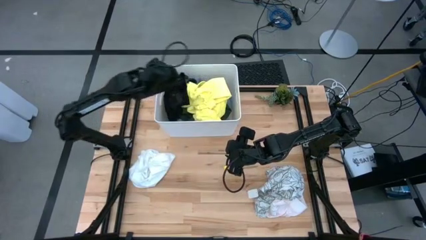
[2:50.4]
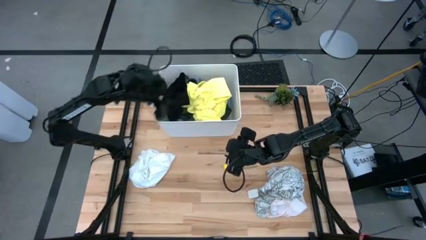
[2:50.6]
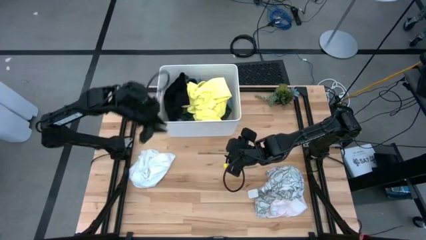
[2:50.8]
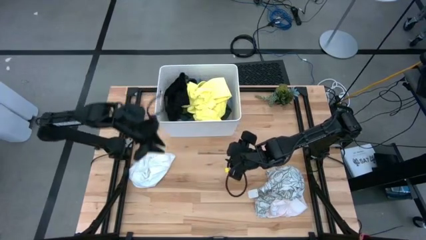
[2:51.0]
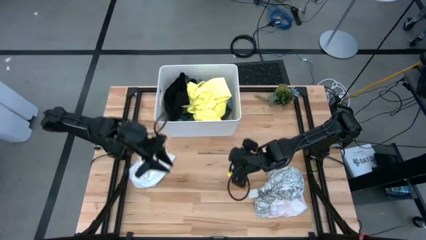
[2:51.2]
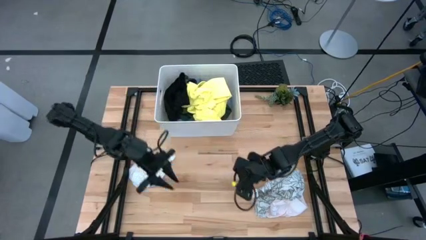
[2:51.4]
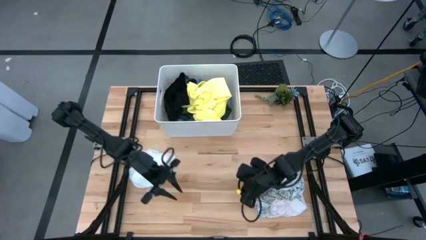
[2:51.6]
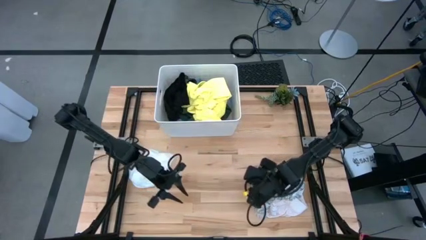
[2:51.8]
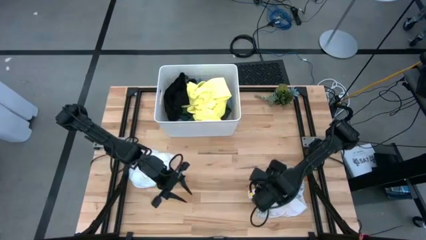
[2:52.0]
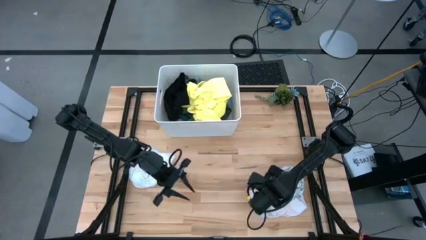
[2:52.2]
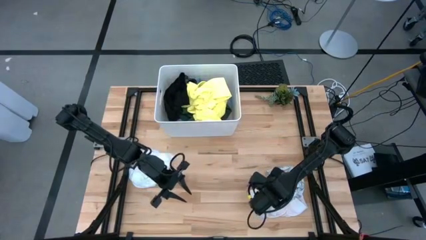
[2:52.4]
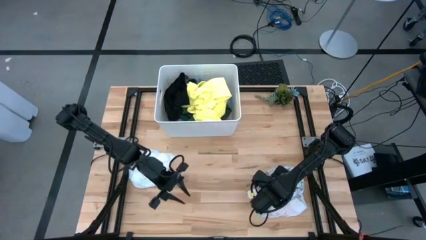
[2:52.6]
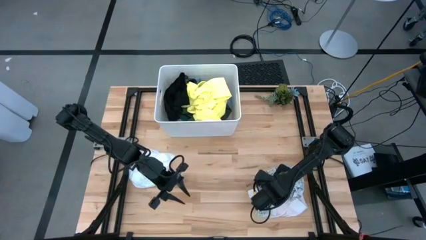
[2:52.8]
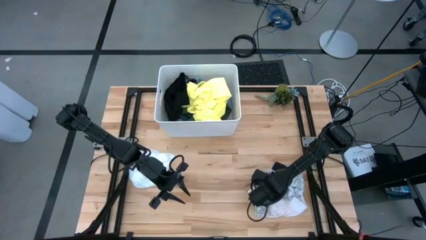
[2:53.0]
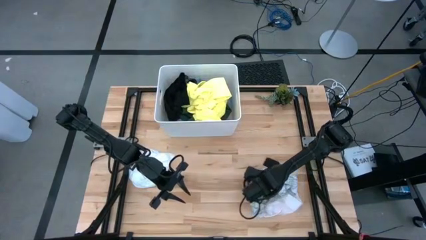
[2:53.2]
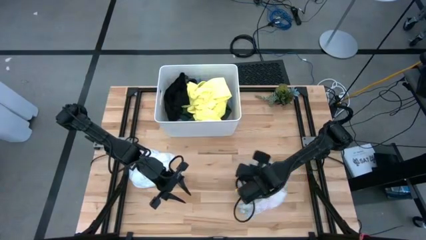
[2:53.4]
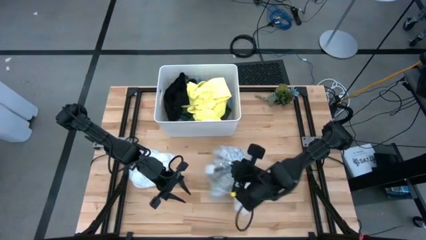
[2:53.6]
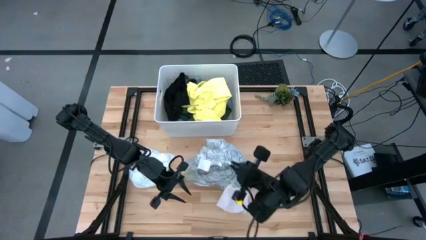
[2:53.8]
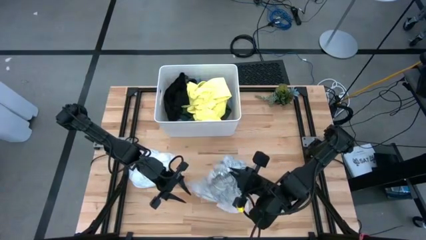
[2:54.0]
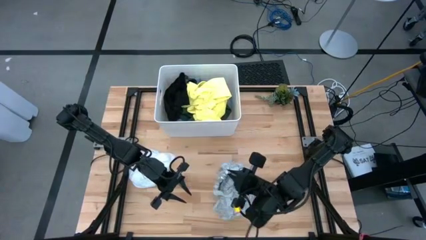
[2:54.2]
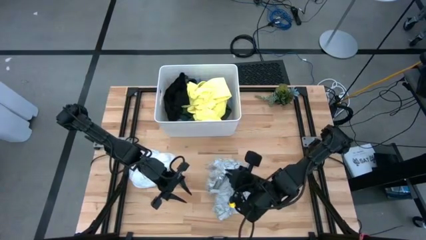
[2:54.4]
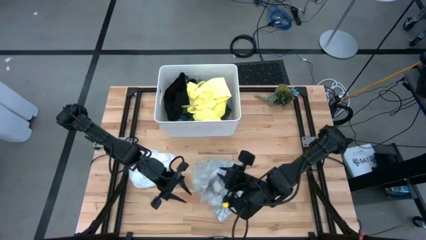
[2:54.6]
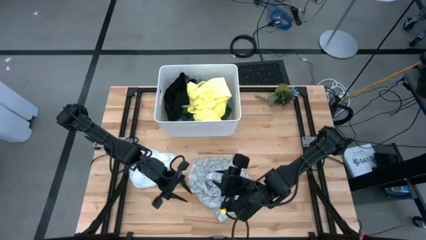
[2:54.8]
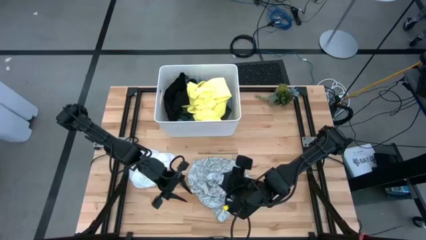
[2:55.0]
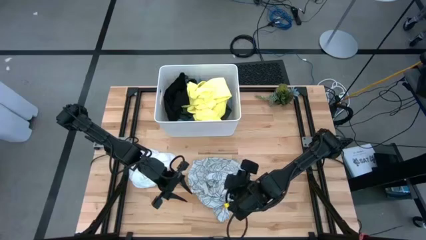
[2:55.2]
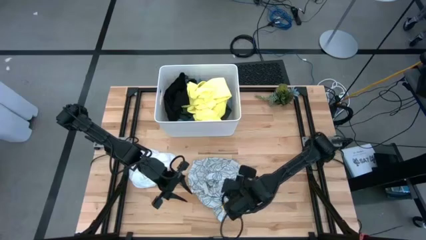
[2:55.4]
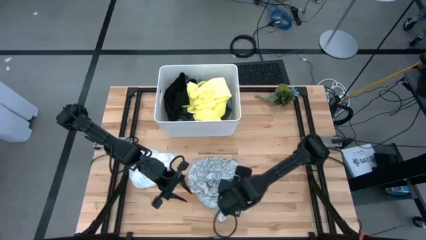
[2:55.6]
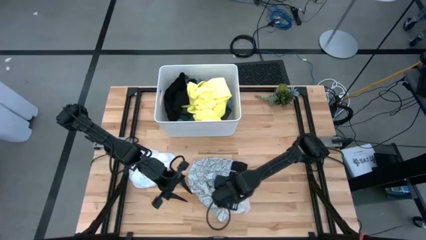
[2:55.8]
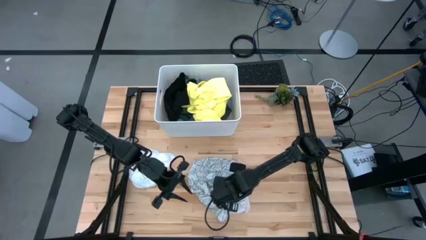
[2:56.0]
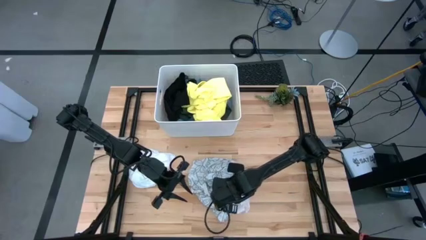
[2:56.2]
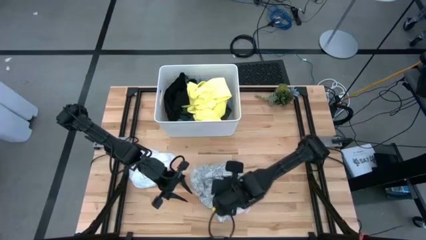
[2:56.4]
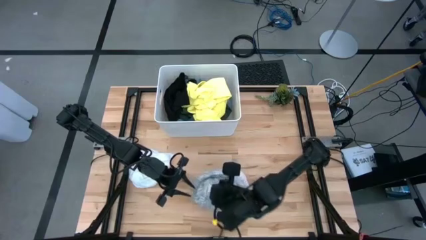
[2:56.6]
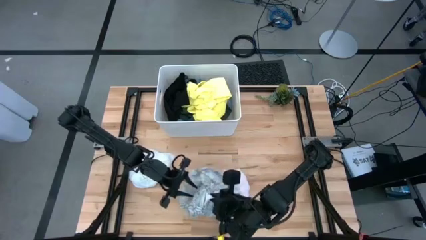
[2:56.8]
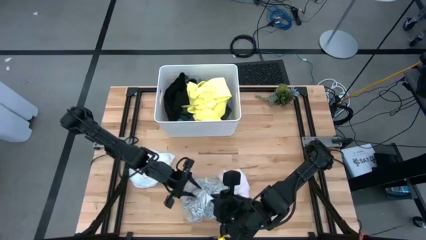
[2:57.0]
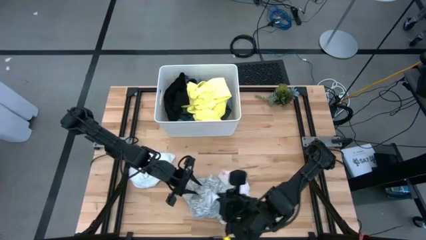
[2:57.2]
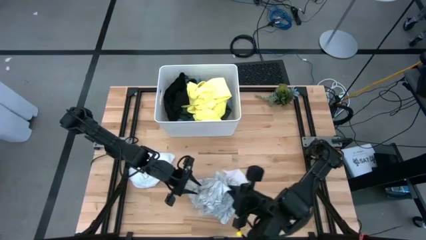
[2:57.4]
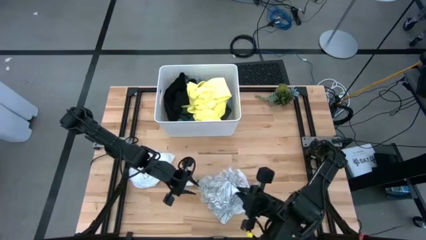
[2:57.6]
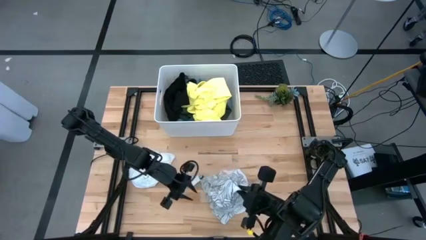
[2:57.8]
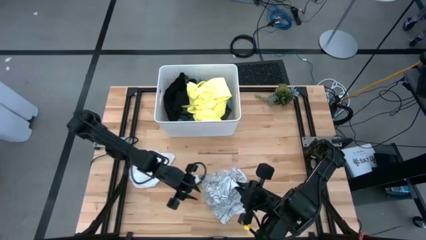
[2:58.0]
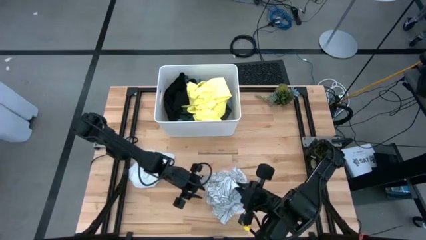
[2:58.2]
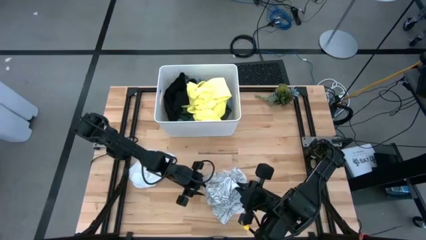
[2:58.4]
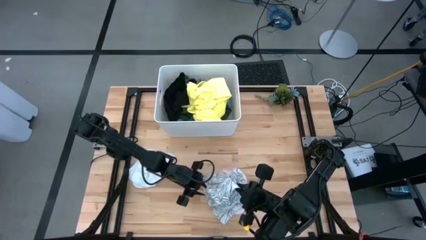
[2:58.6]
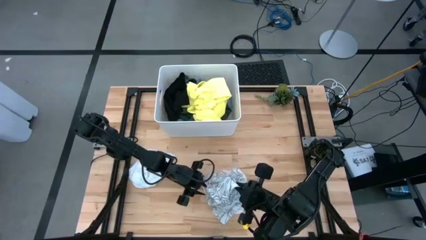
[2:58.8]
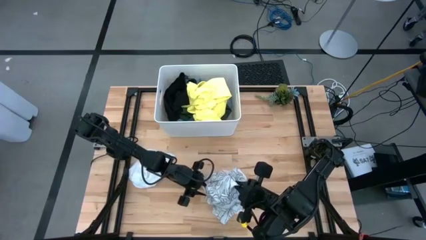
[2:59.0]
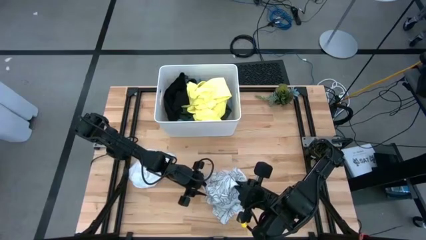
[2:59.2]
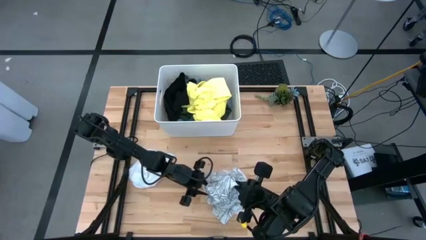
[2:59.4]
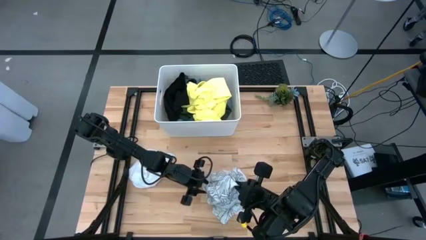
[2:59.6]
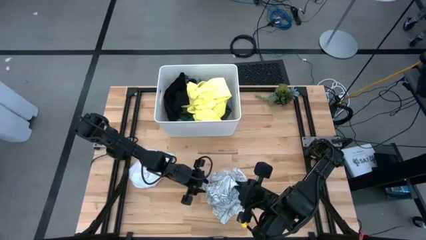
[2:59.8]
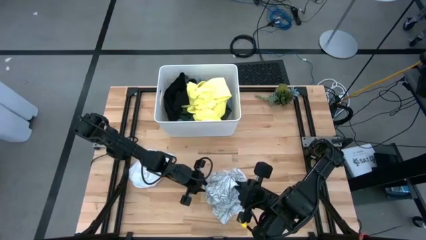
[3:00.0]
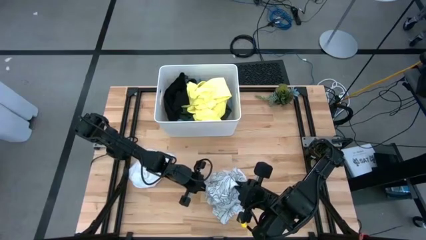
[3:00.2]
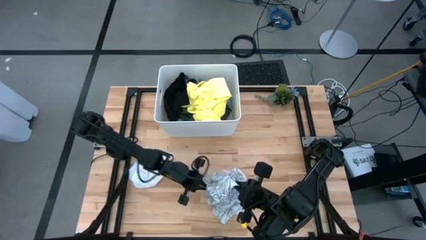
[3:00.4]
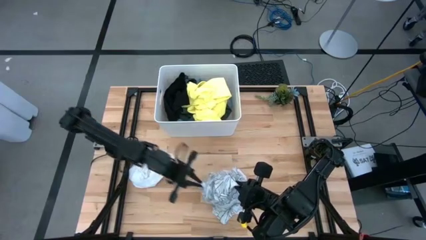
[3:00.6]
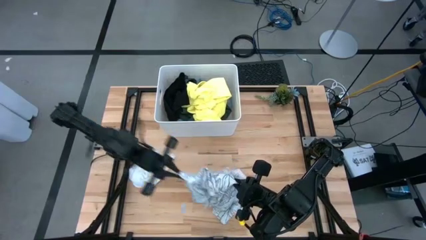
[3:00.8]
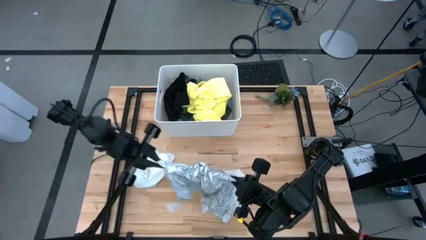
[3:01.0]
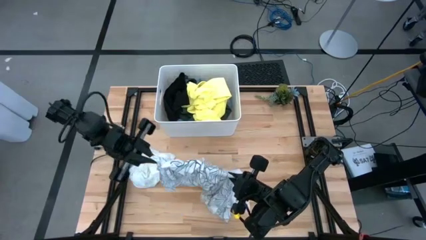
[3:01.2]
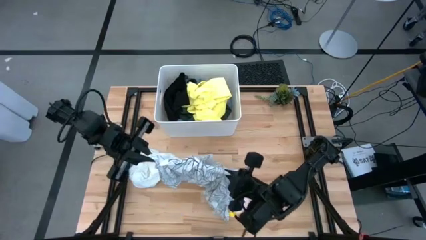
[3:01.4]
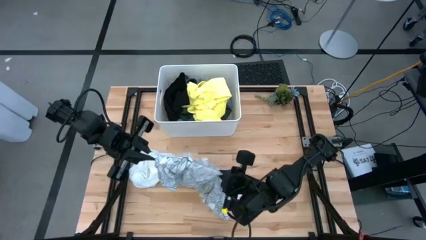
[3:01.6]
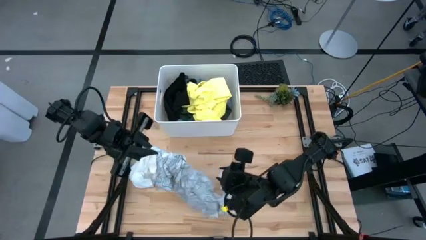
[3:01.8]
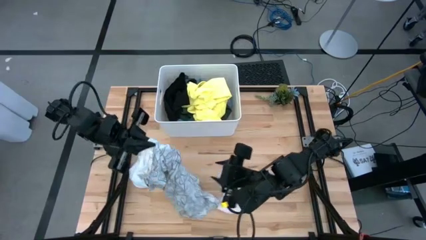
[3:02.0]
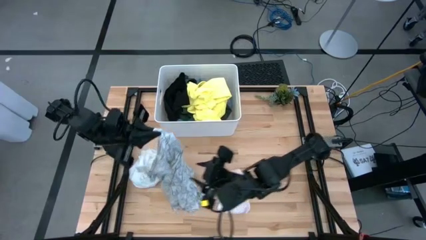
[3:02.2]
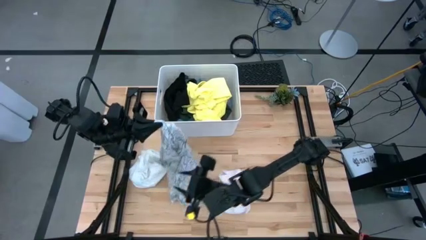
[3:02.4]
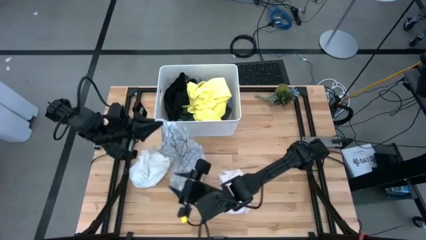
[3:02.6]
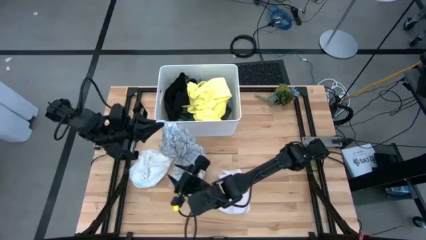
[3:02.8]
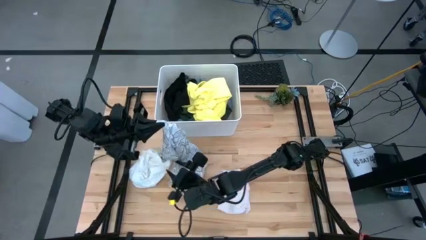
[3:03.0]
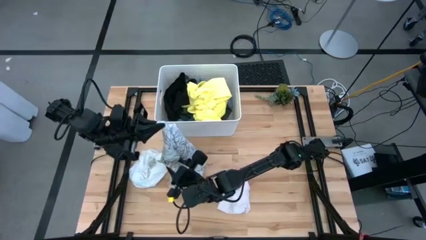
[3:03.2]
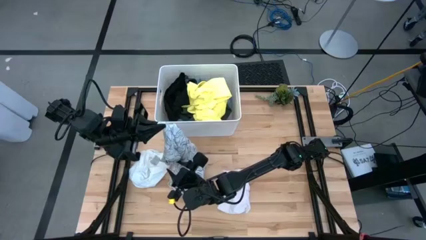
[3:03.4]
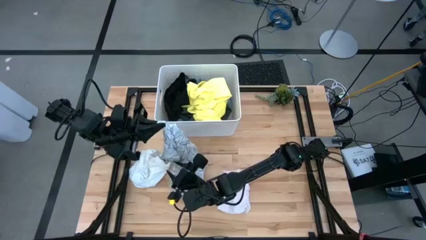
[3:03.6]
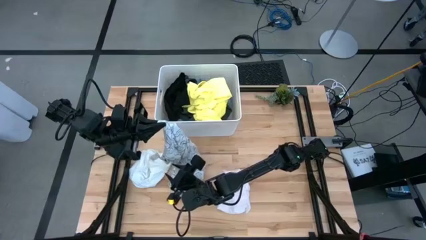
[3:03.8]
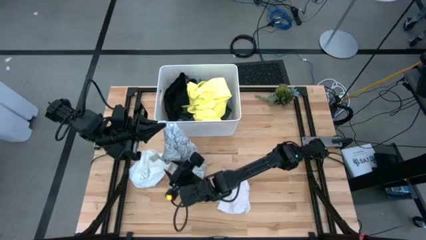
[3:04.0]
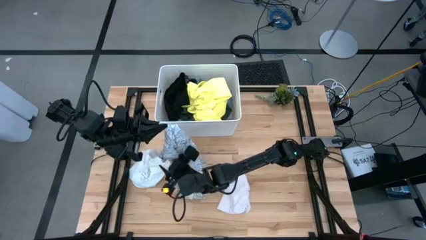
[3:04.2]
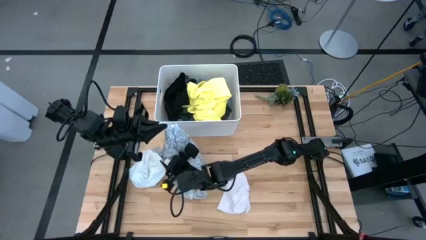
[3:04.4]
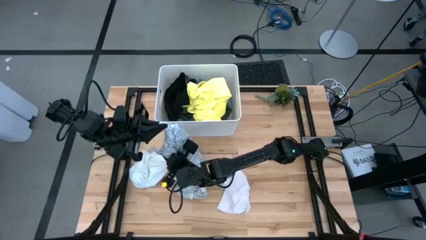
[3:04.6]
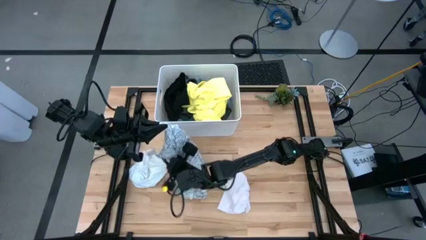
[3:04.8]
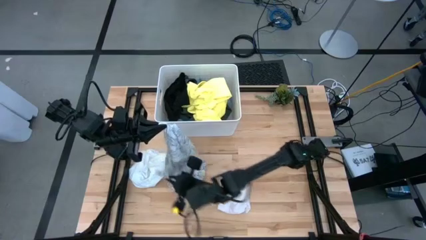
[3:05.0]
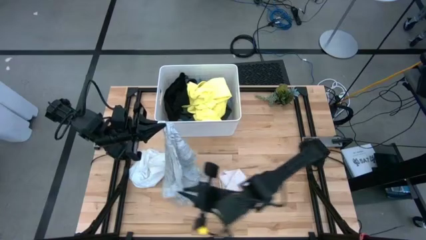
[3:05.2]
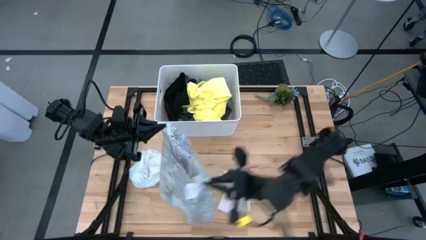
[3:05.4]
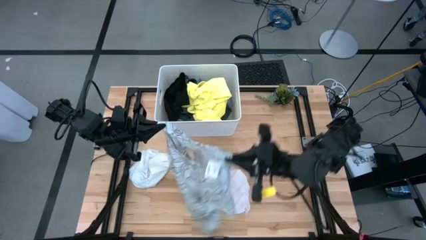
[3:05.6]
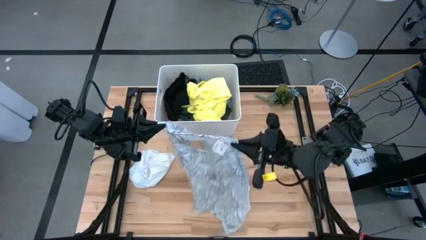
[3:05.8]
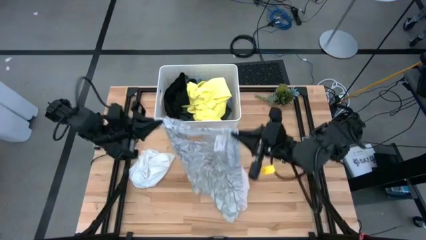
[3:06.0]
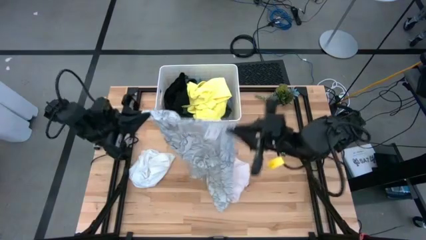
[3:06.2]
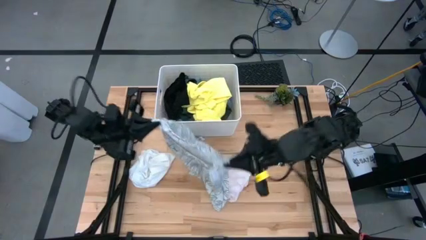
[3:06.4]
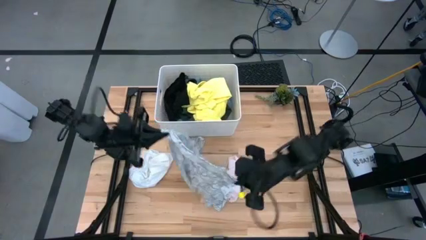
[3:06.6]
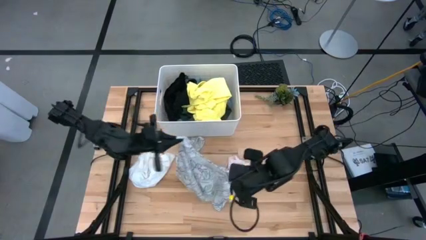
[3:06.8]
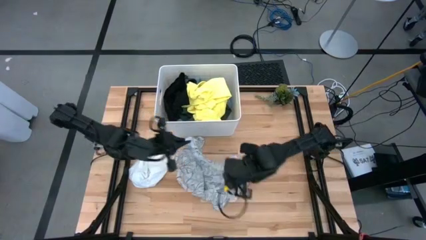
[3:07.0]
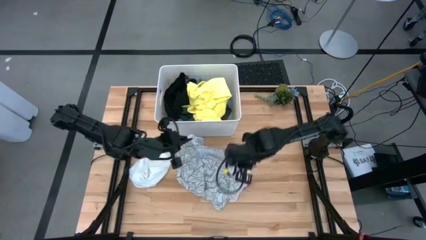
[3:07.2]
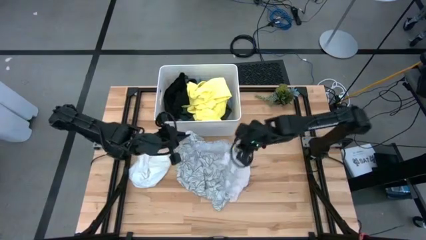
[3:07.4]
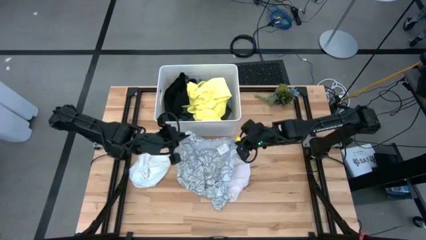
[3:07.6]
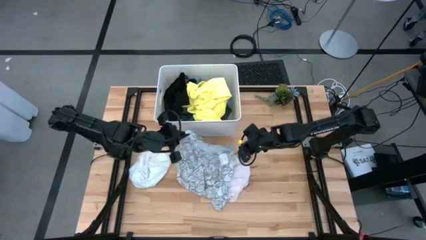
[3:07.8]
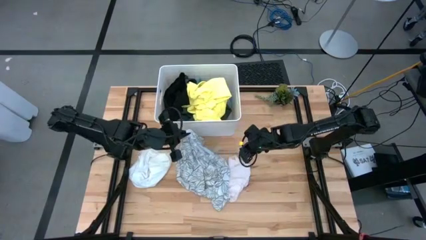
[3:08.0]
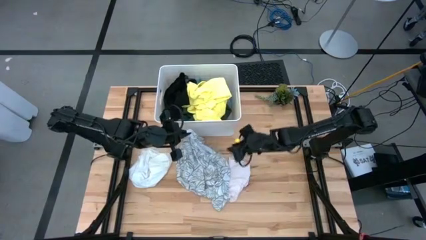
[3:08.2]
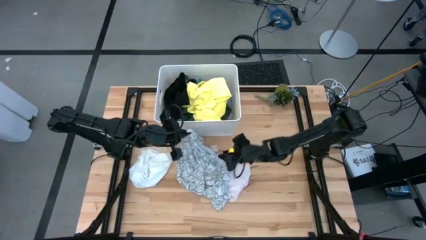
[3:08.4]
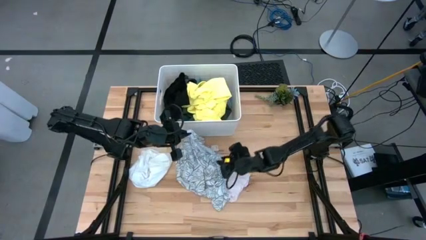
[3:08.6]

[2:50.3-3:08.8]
Task: Fold laundry
Fold the white patterned blouse
